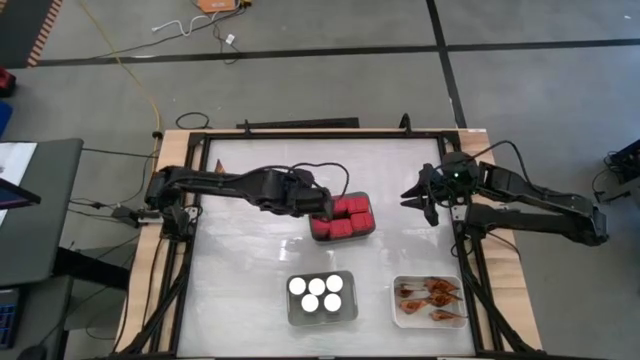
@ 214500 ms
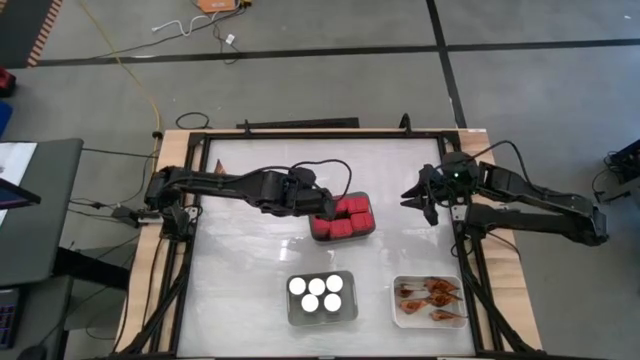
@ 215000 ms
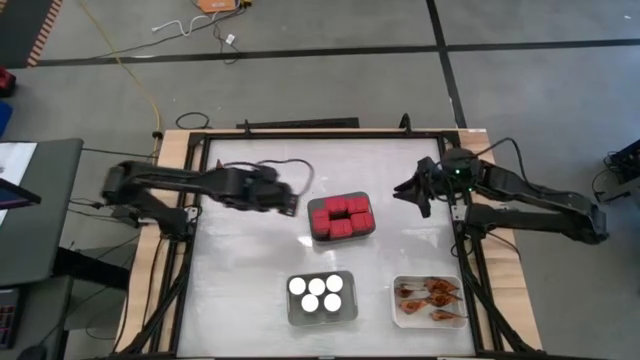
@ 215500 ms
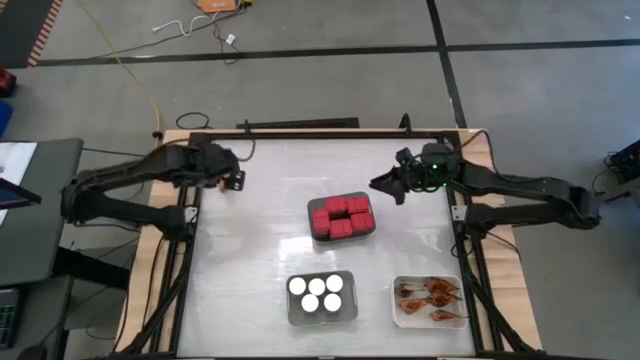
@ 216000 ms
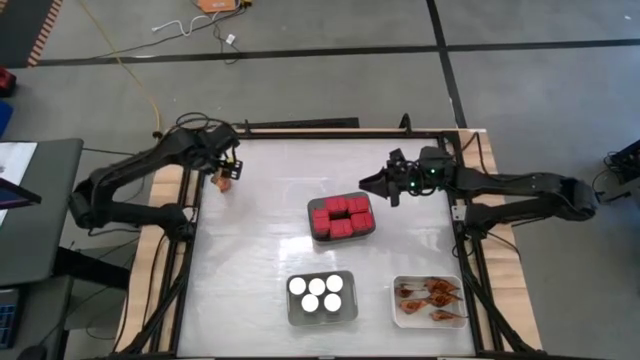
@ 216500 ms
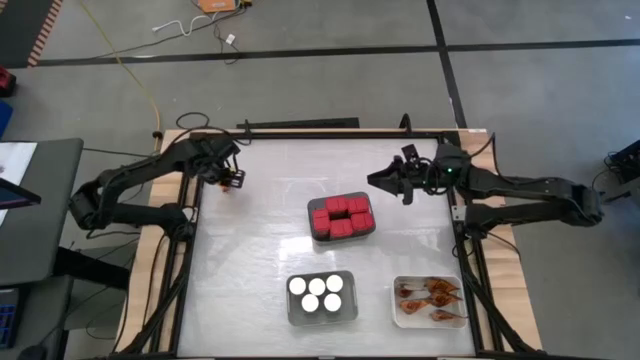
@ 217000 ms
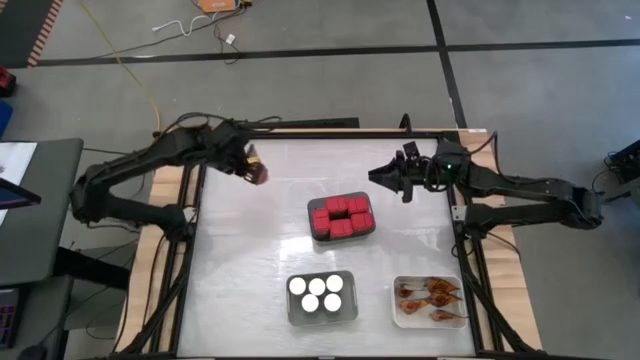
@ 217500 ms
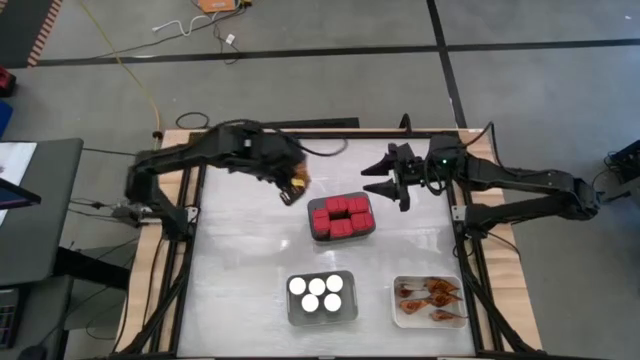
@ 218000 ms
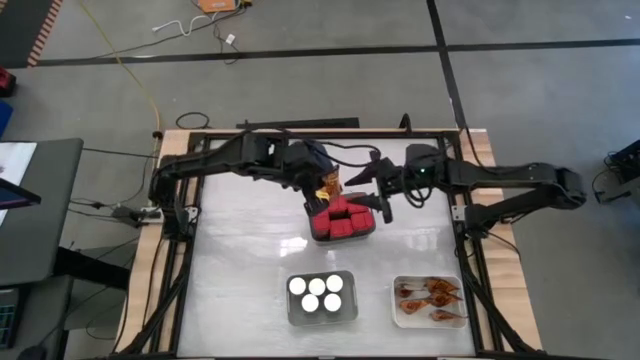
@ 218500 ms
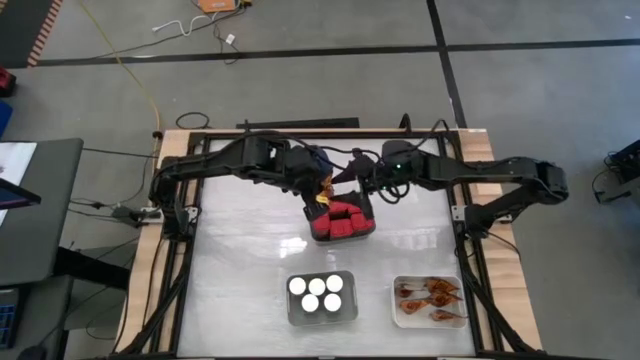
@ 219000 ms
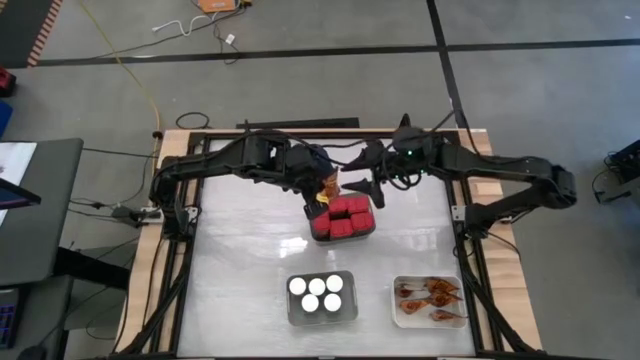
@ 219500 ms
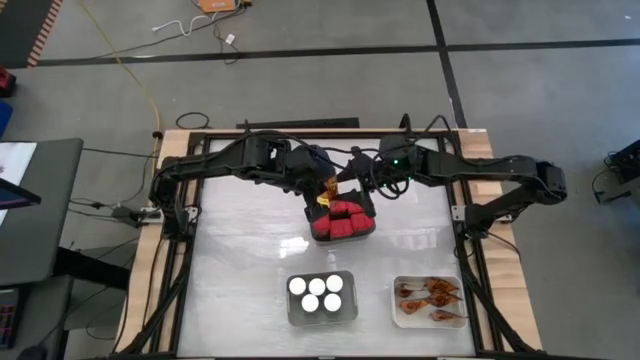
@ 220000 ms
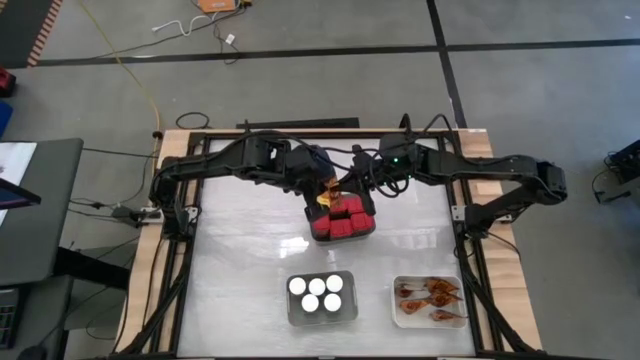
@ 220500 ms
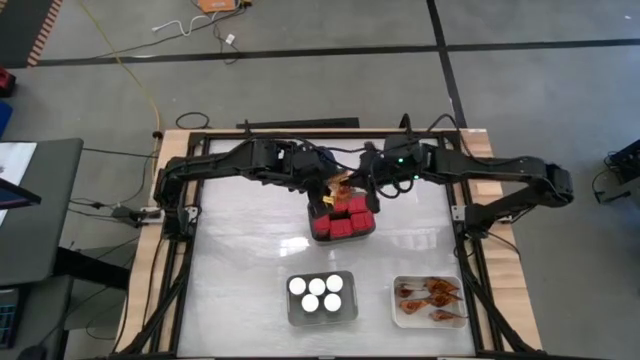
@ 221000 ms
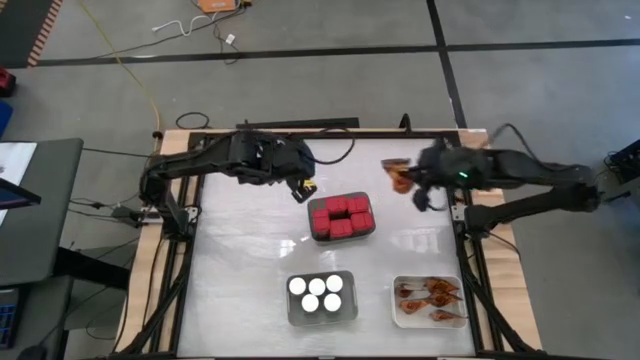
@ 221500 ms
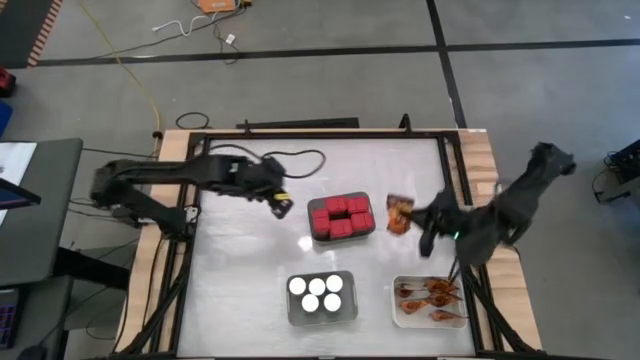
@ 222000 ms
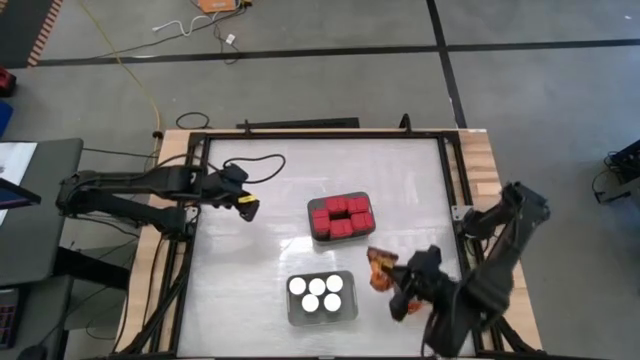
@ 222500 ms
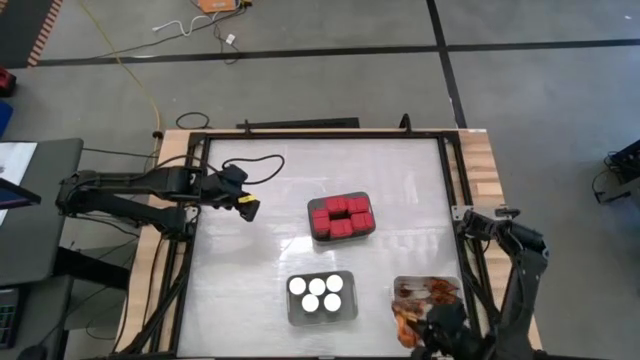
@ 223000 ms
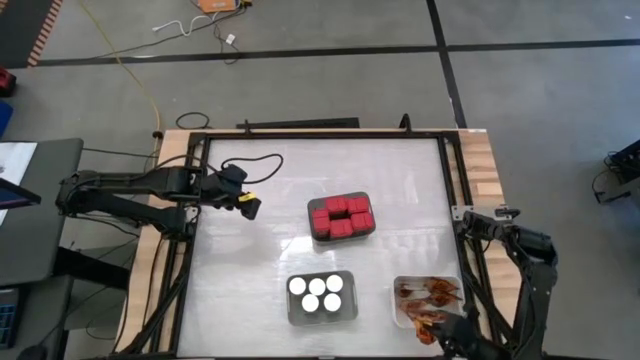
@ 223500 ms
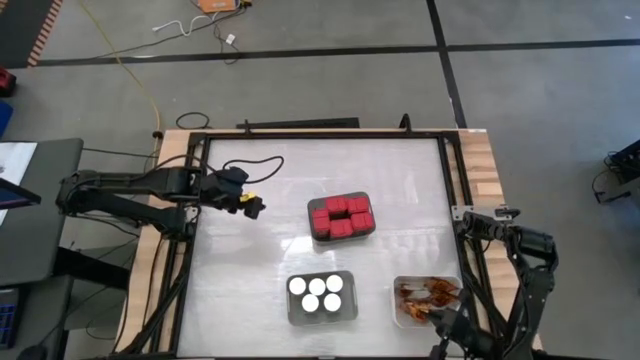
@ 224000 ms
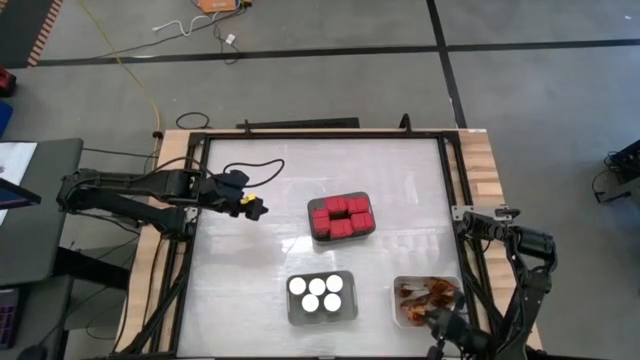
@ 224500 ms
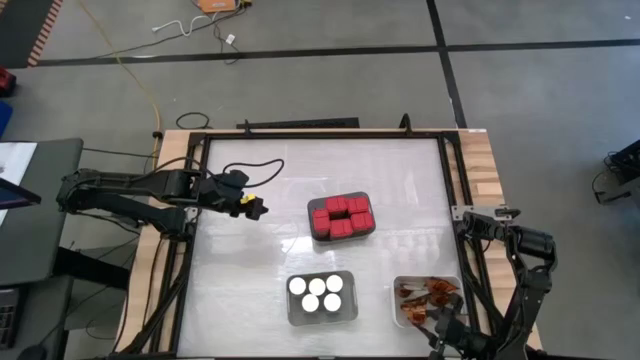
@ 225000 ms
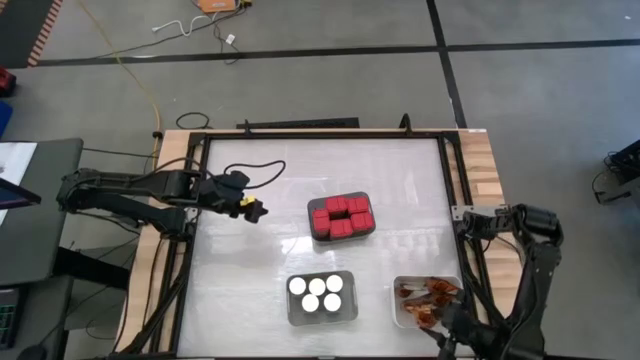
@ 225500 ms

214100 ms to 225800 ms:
Task: Sort spices by type
Put the orange seasoning pack into the white bin

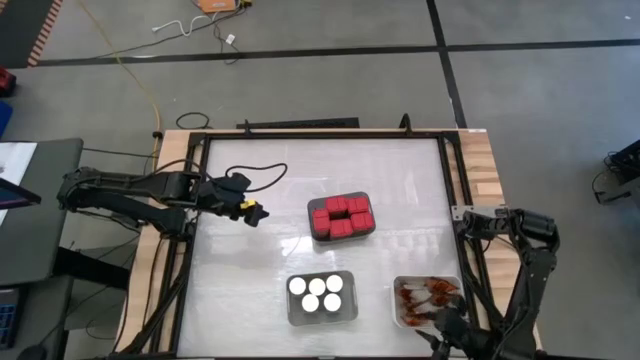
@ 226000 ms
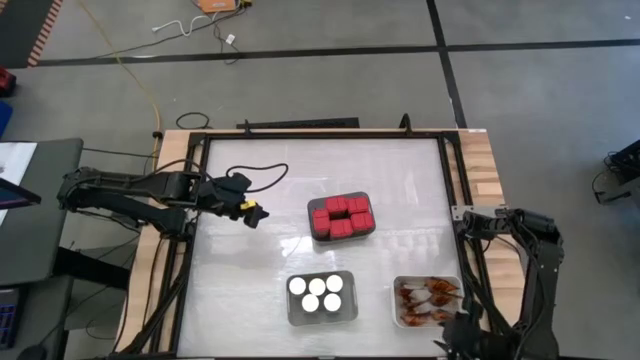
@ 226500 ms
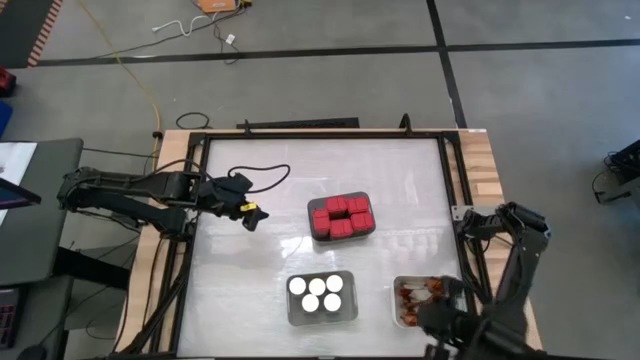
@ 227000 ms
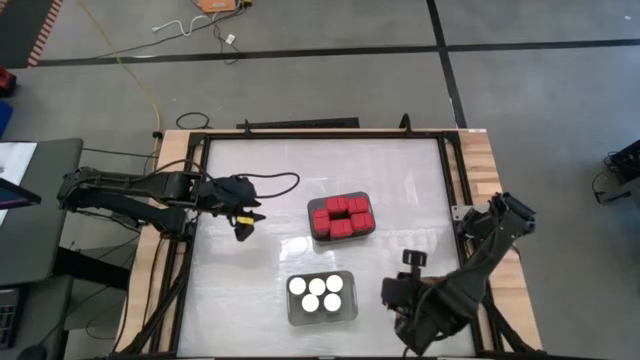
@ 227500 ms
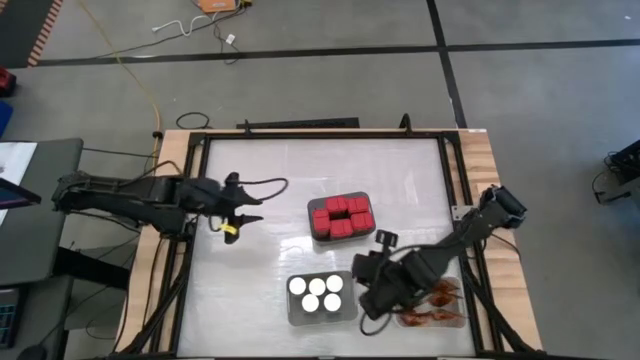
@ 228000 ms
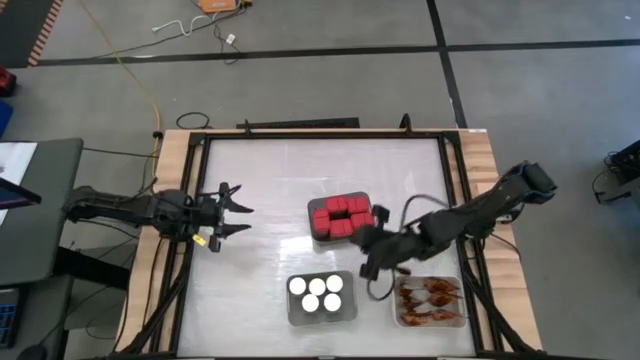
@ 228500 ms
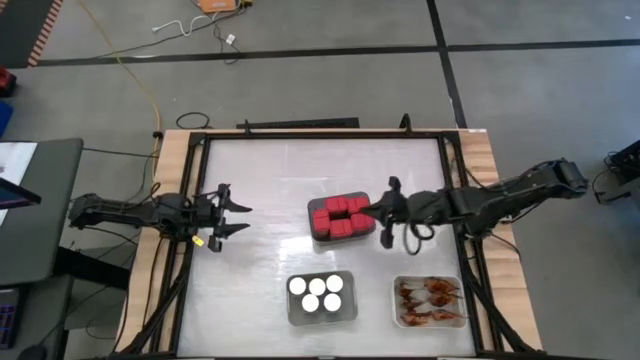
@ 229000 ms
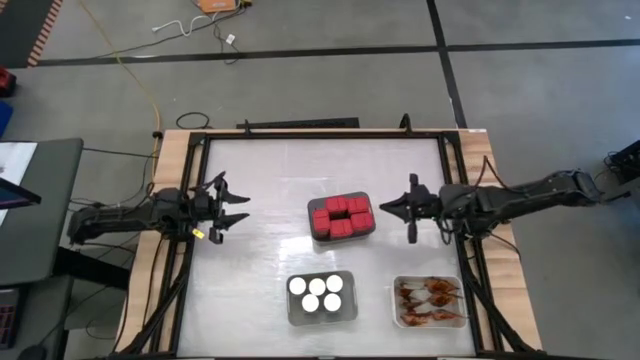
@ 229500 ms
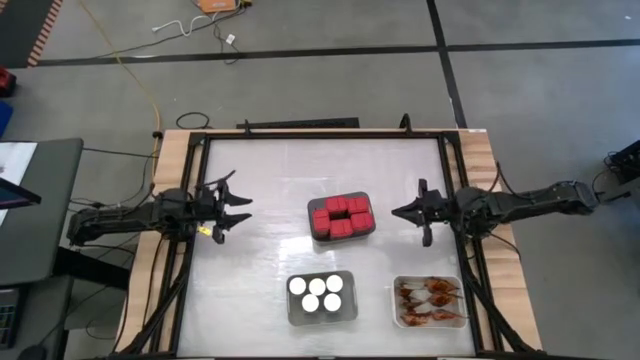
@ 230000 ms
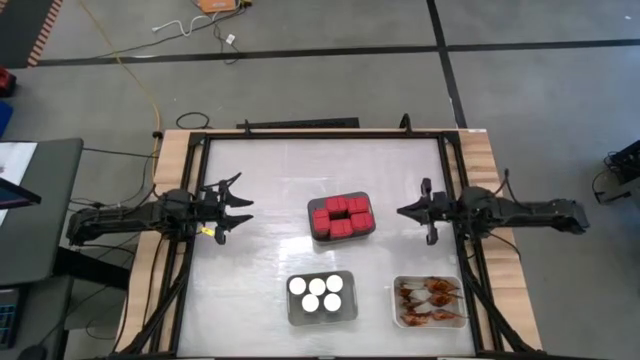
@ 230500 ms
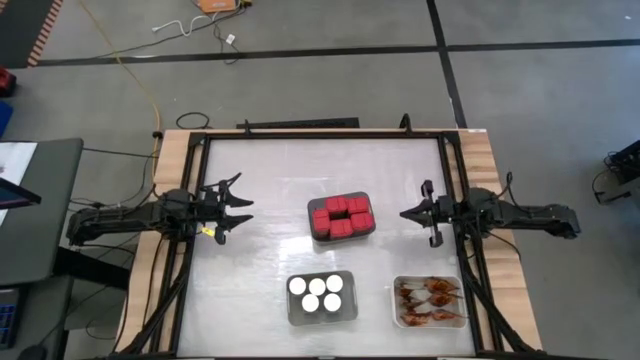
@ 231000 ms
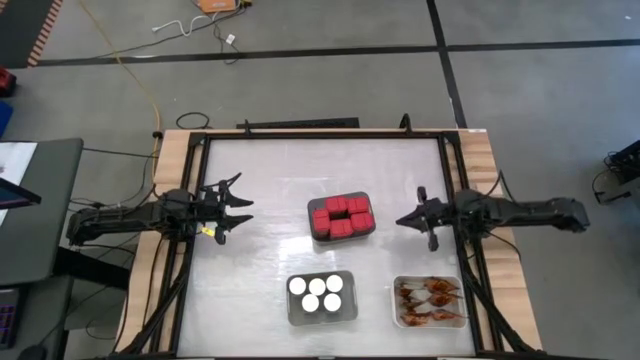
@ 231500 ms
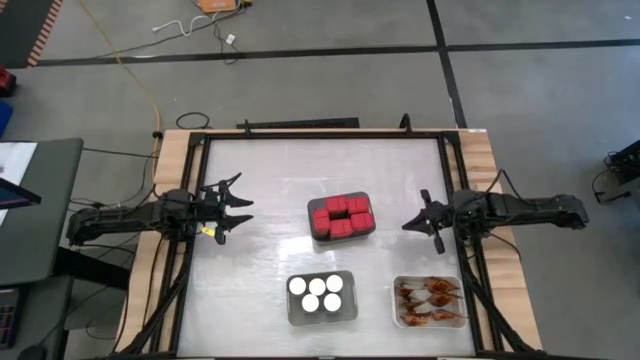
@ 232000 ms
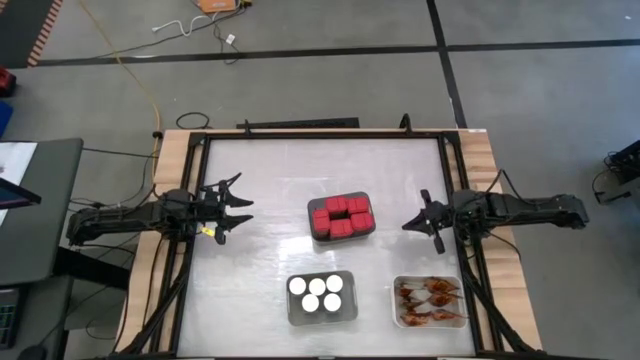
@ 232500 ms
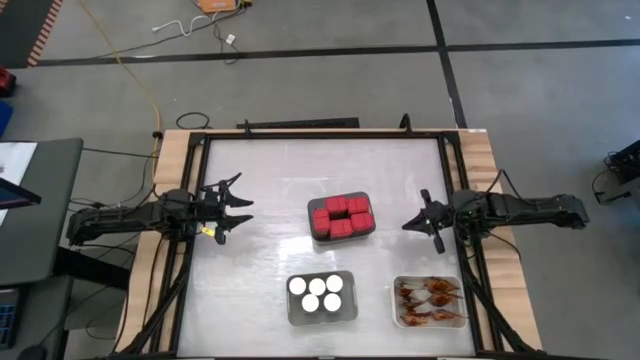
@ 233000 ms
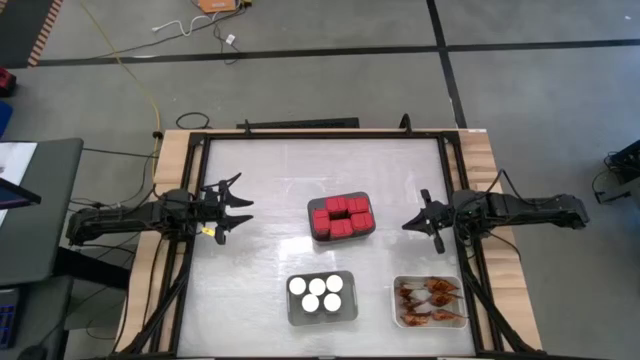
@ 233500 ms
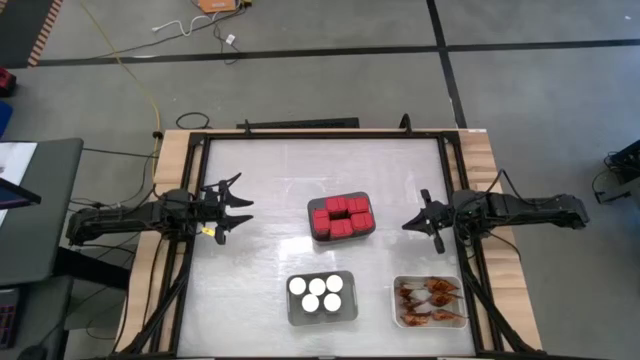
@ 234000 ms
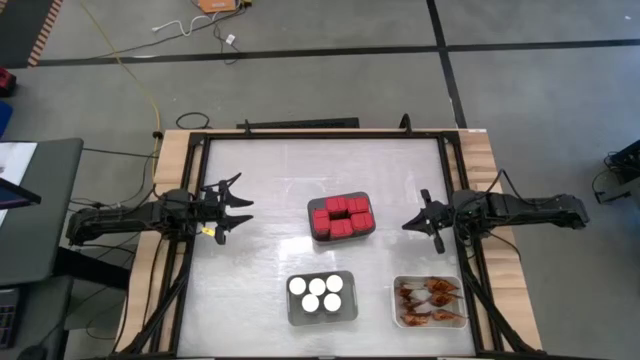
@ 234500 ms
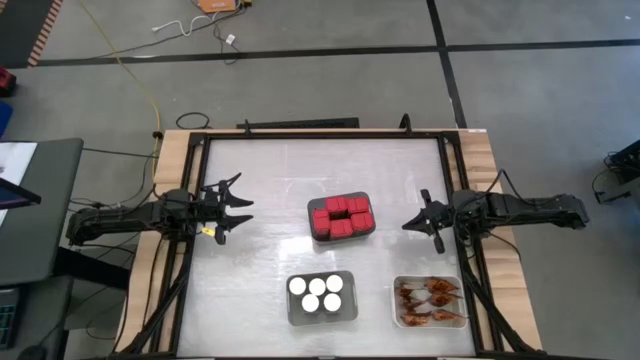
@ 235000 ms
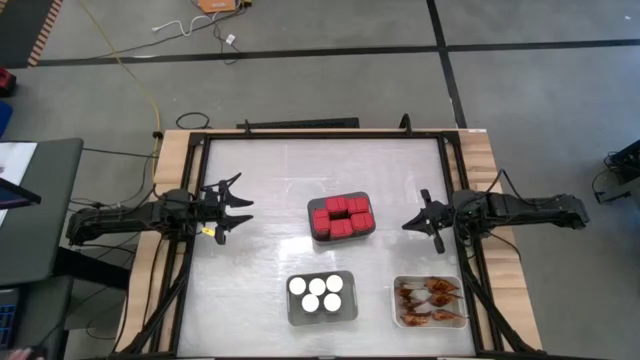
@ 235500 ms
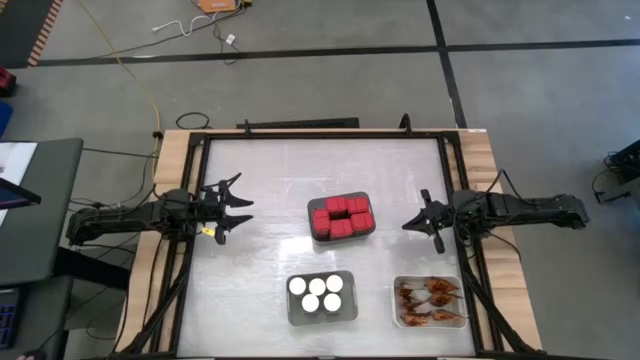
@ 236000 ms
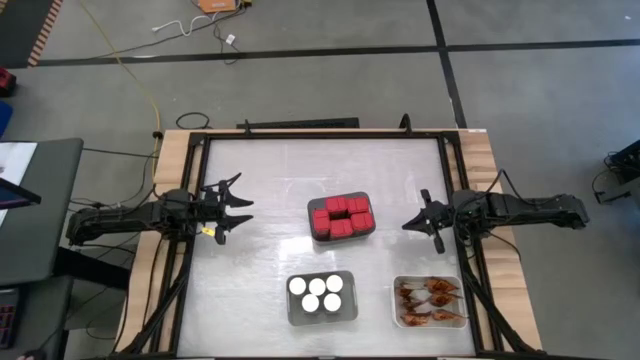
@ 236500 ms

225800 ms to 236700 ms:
Return to Home Position
